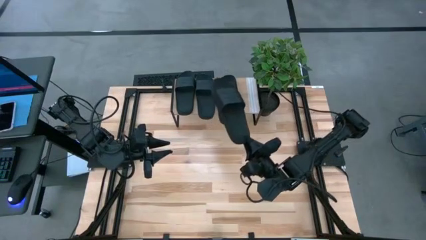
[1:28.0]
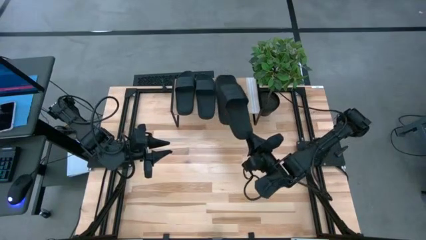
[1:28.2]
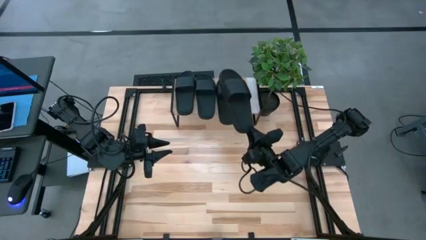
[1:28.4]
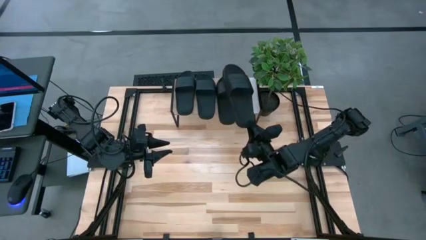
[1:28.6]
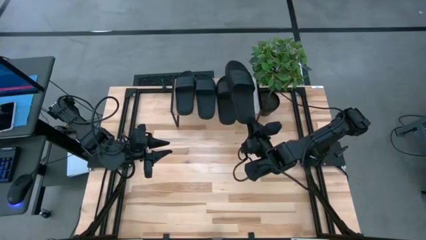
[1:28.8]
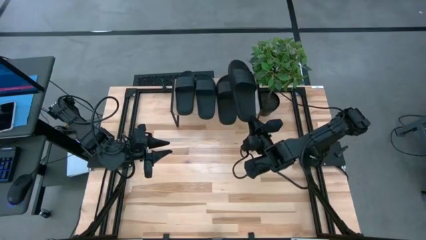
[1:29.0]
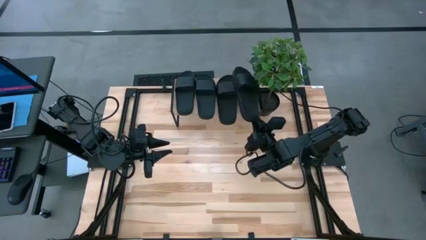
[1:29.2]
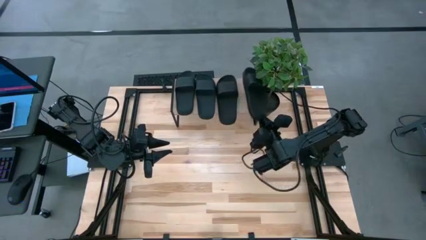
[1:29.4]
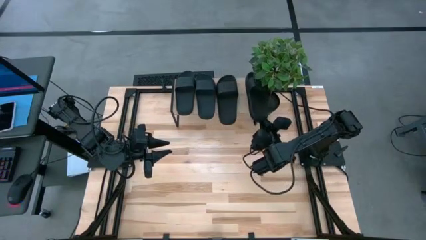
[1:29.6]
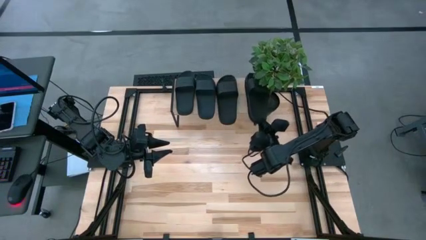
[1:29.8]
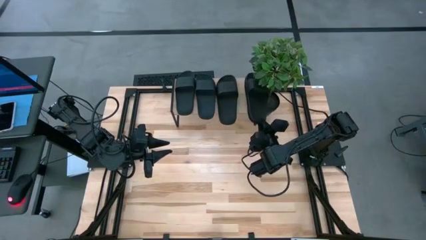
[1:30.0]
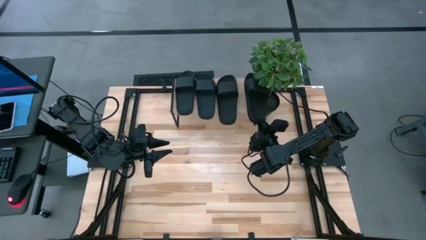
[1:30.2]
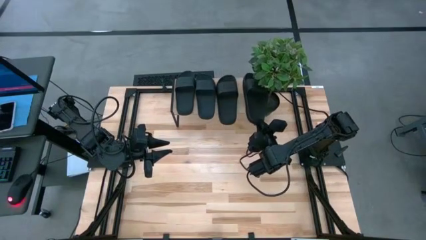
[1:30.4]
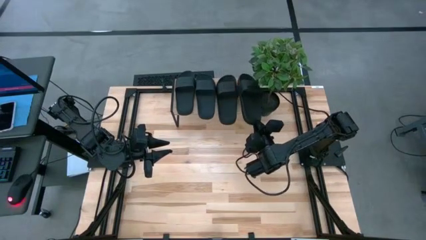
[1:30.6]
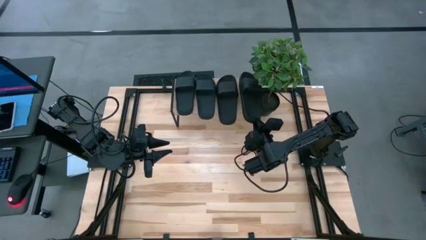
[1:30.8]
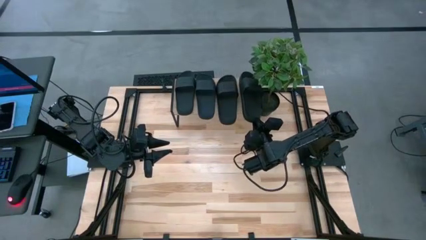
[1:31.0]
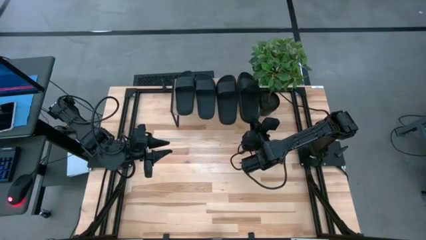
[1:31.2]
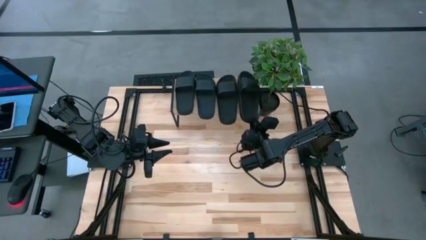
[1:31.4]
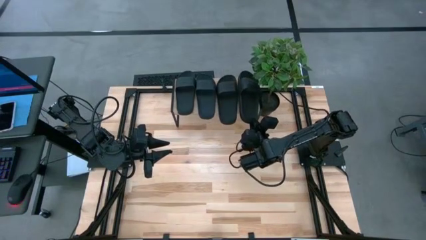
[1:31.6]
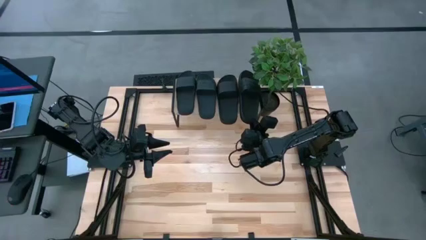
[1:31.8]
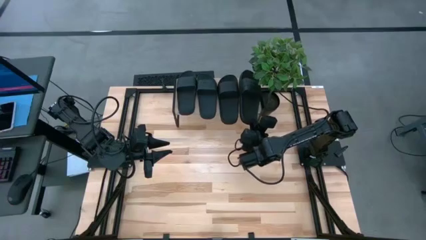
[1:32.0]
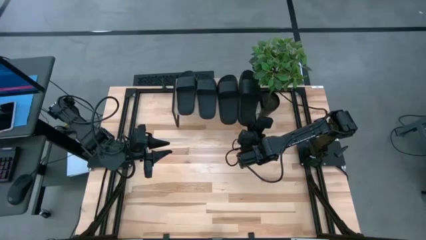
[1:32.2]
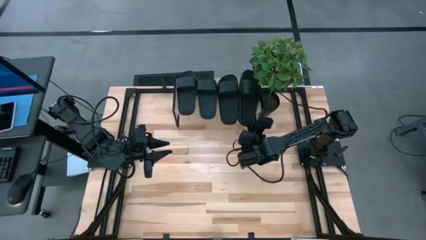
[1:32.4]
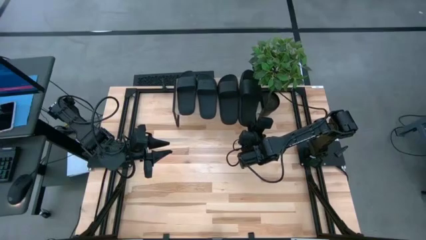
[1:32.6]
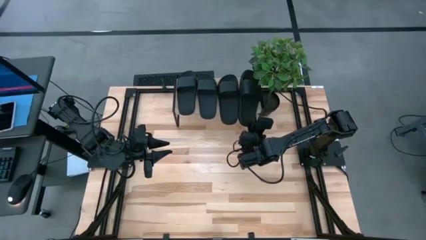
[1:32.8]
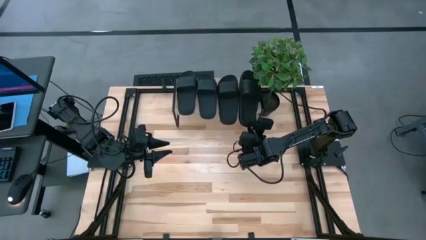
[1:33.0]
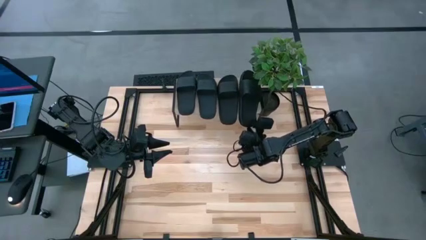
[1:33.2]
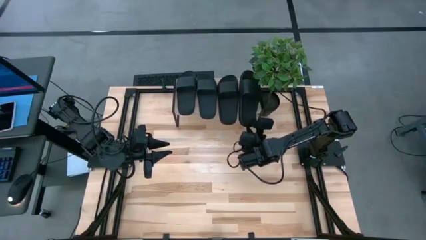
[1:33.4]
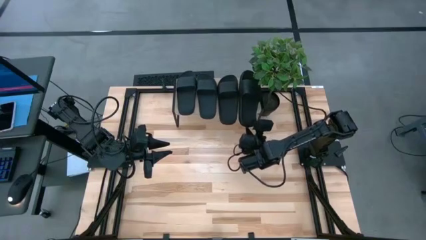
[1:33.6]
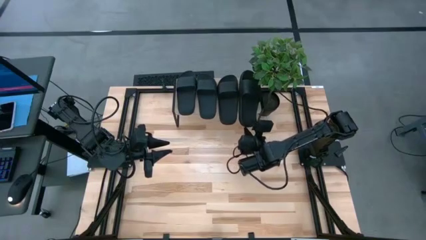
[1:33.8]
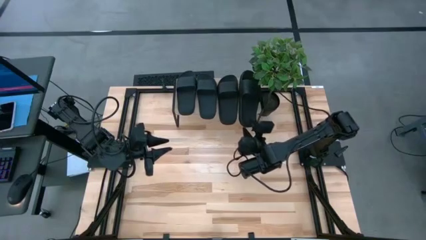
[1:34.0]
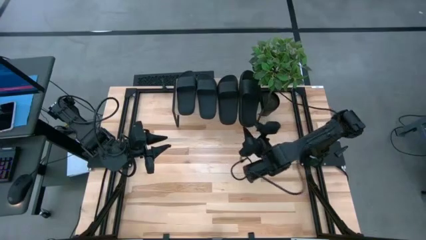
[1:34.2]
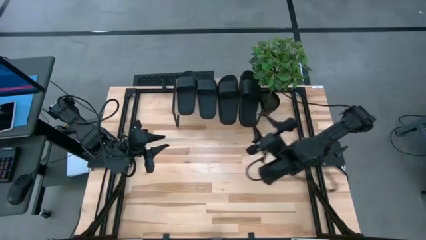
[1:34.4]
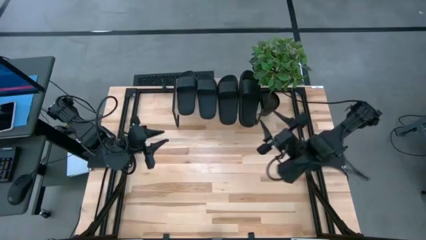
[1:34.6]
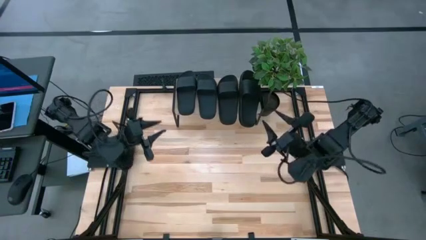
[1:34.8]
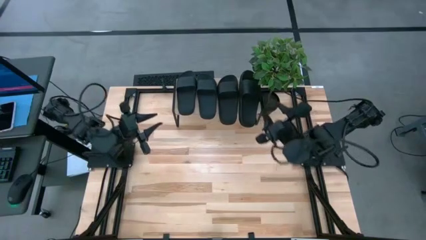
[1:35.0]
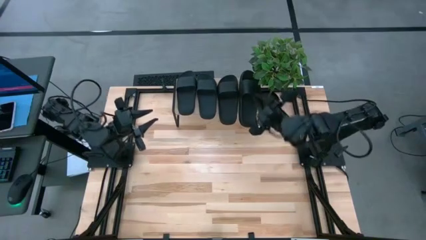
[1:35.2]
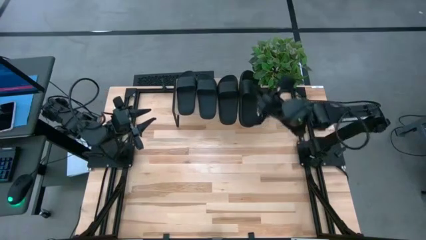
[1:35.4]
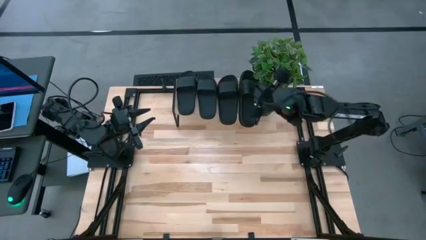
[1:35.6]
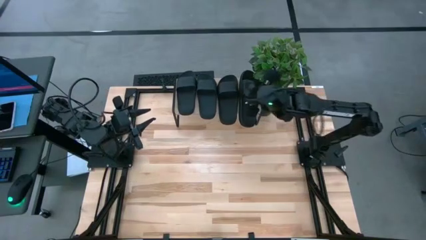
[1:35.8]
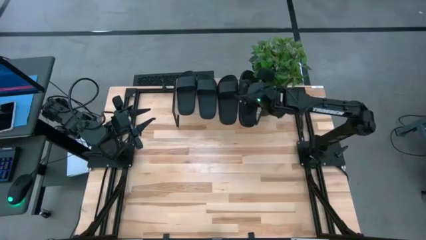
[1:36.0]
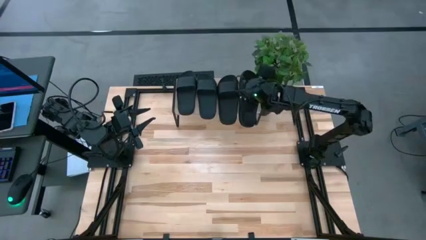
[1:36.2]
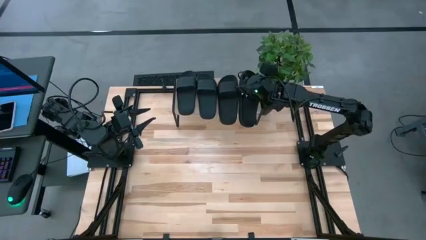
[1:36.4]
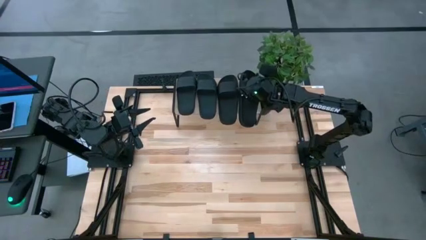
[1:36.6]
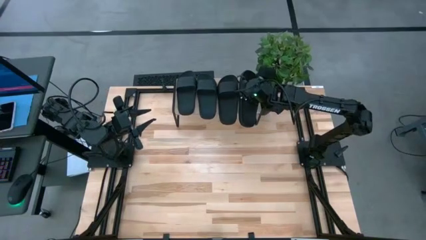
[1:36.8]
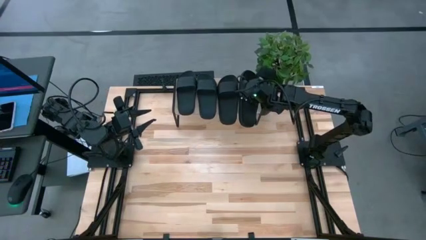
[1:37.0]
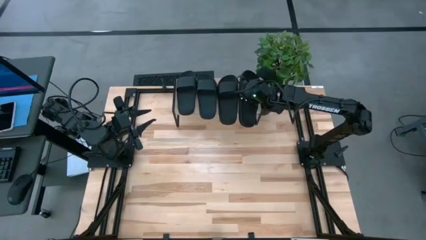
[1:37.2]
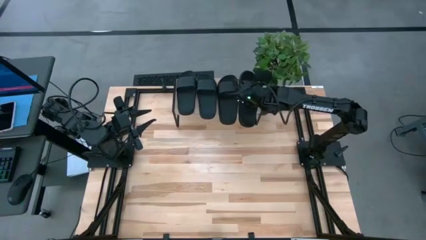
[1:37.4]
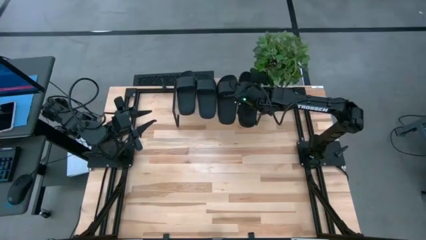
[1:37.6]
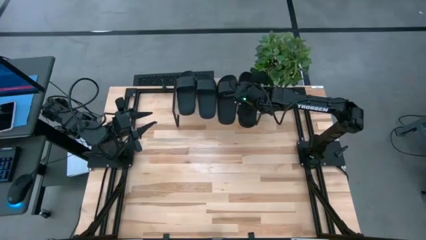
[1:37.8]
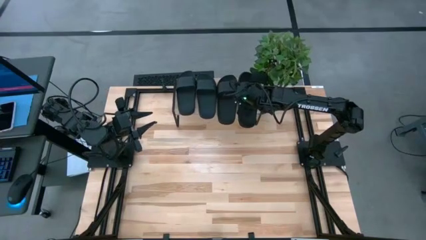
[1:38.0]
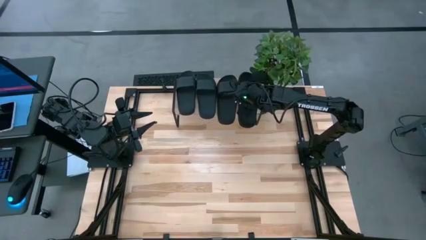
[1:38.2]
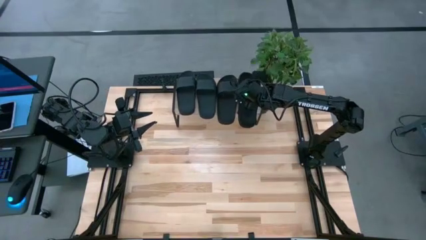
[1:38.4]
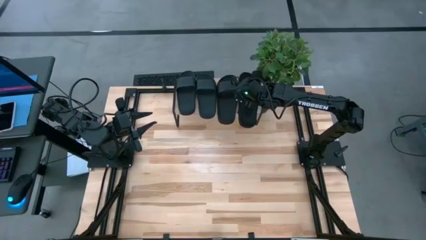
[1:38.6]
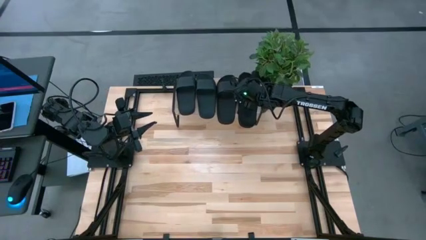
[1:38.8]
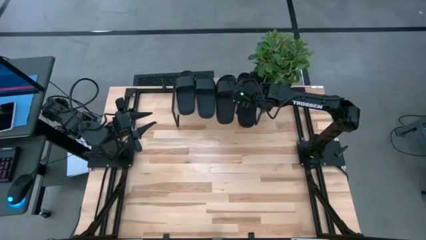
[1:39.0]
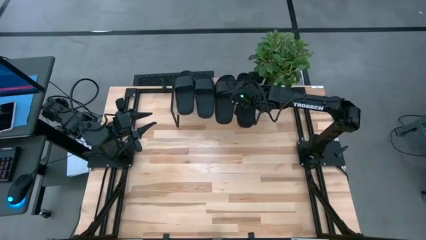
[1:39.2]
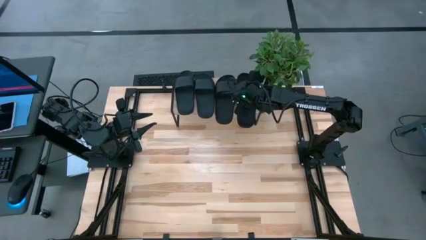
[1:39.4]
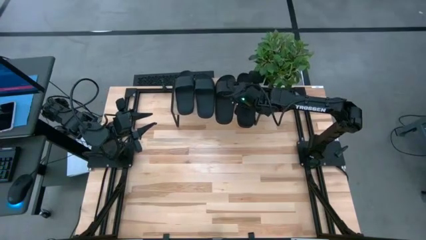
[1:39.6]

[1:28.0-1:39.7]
Task: Pick and place slides into the shelf
Put the black slide on the shelf

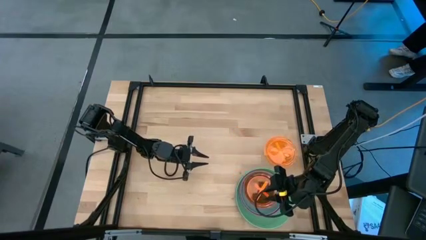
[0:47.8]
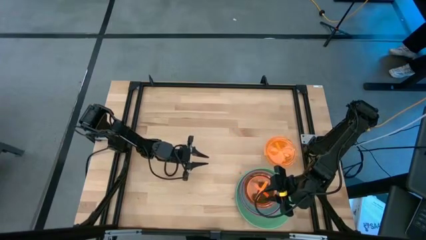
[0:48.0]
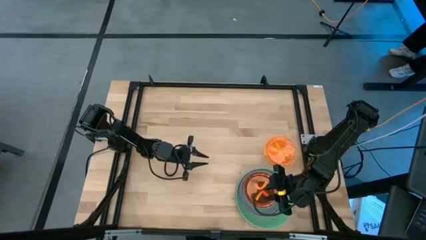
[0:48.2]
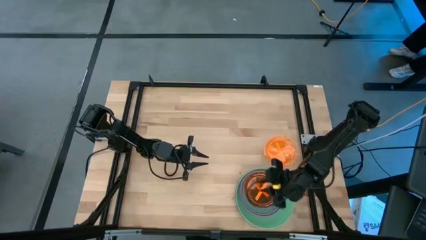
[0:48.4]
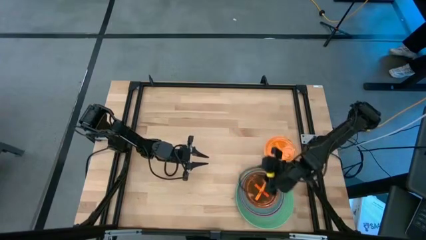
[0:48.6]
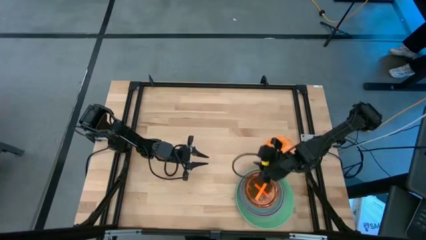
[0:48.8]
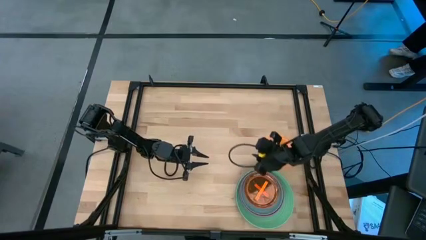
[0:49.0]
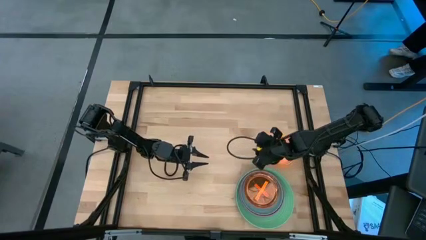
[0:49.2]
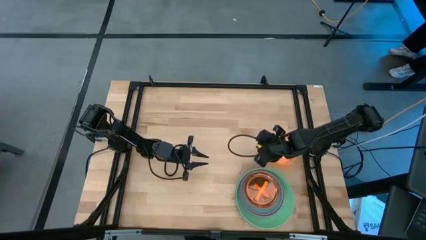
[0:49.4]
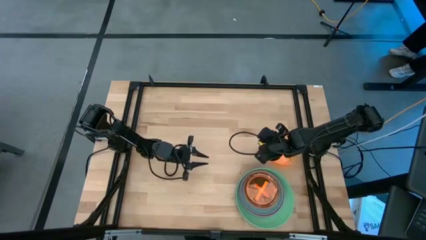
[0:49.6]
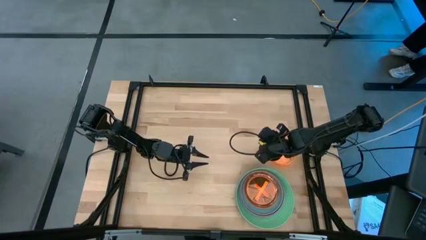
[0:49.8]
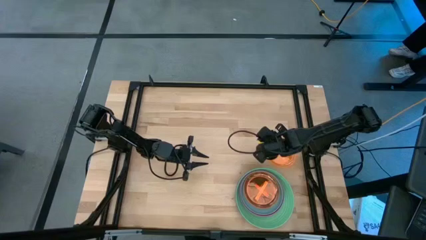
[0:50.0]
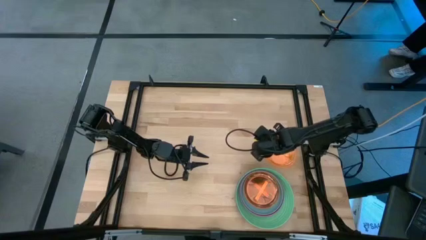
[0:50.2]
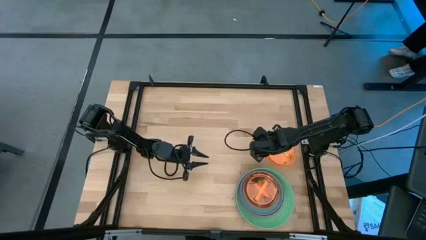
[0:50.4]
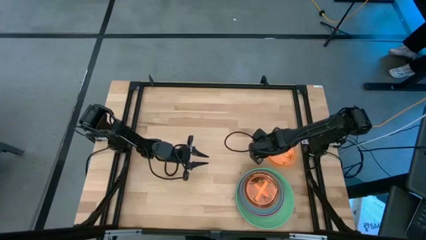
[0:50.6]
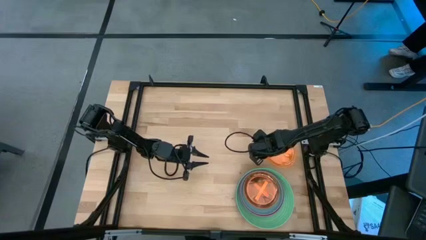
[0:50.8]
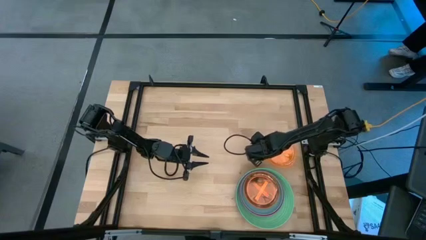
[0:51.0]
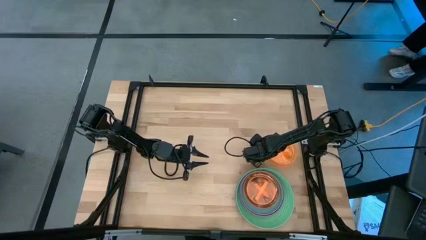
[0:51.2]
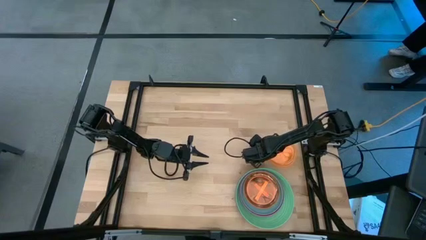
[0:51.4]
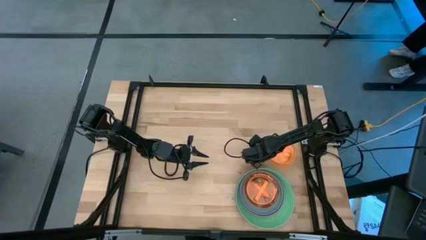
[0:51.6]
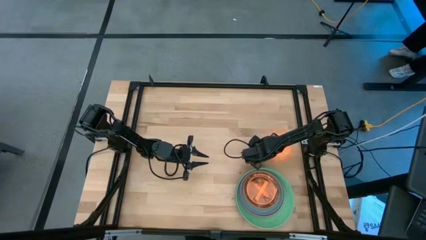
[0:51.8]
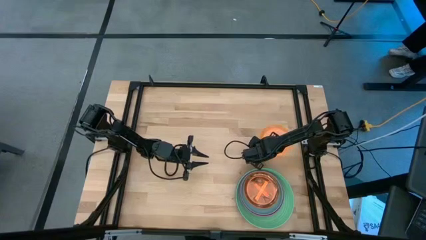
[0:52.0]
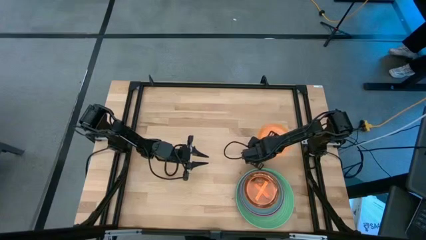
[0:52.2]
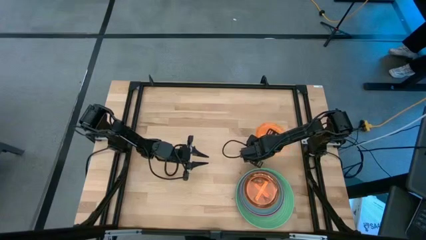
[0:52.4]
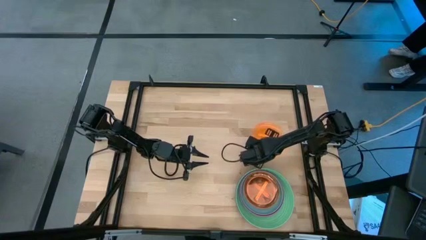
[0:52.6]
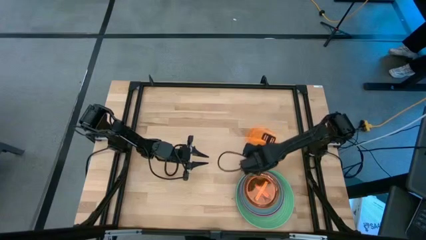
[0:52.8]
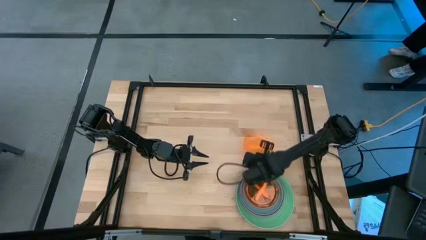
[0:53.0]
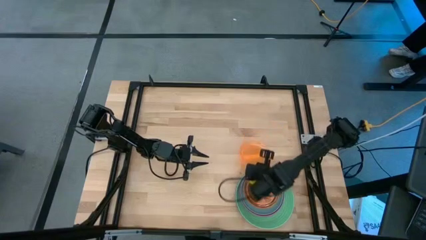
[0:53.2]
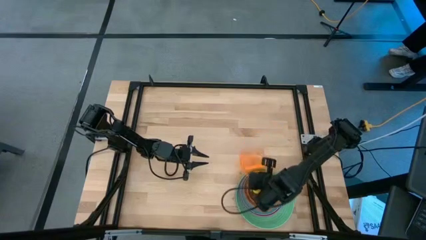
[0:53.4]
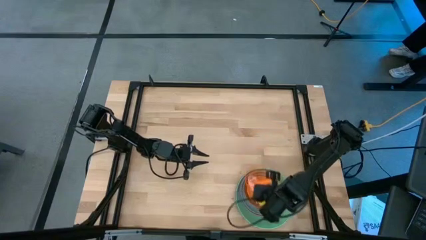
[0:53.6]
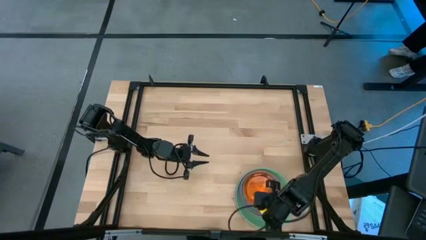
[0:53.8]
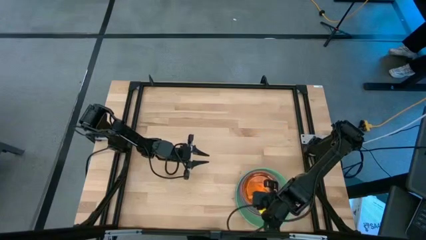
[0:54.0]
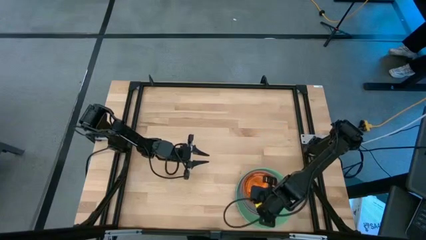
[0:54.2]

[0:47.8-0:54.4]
Task: Stack plastic plates
Stack the orange plate on top of the orange plate
